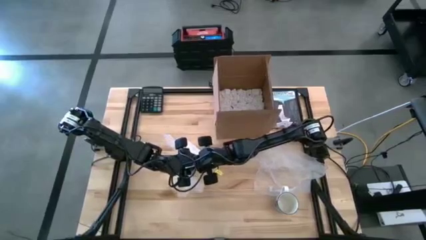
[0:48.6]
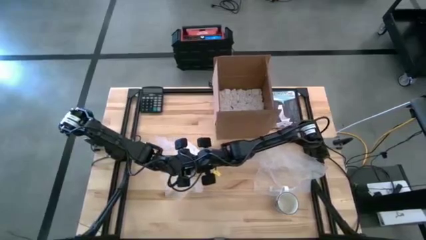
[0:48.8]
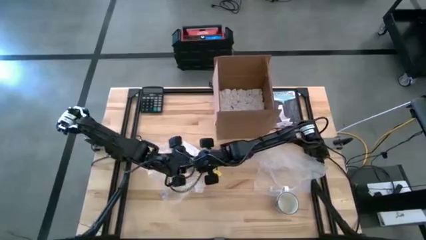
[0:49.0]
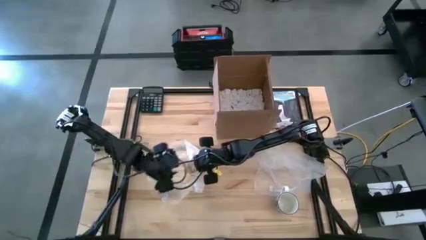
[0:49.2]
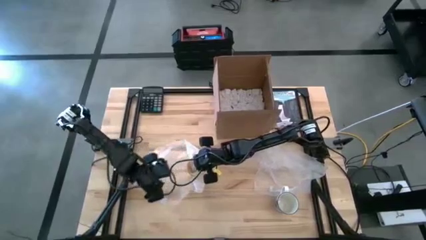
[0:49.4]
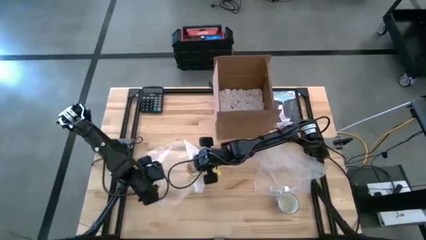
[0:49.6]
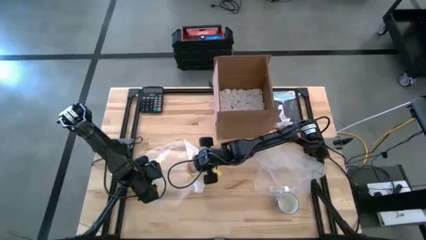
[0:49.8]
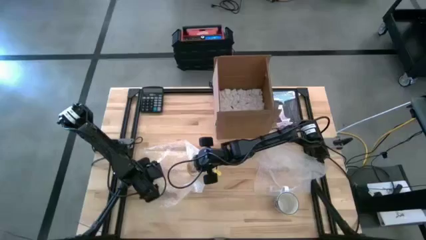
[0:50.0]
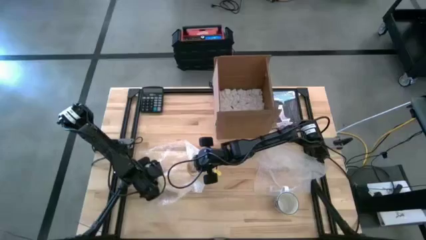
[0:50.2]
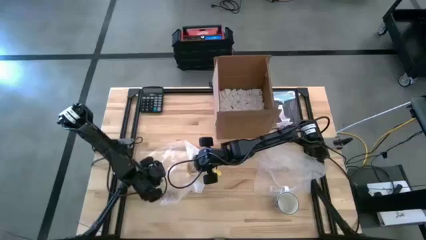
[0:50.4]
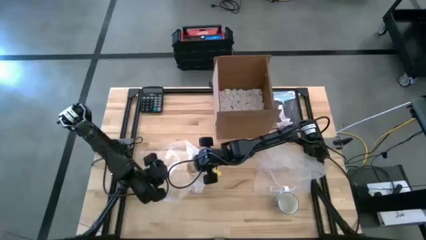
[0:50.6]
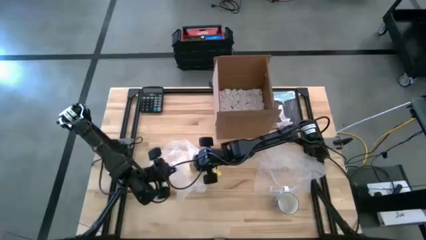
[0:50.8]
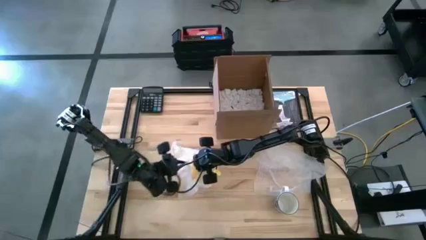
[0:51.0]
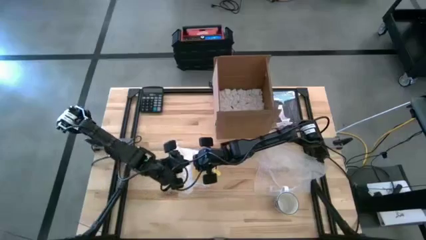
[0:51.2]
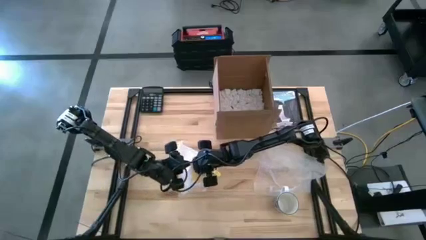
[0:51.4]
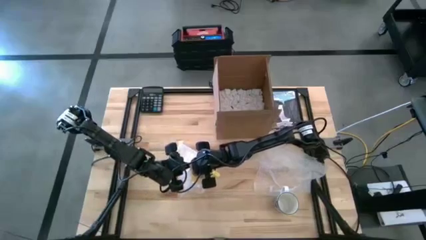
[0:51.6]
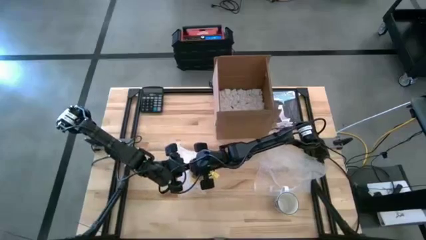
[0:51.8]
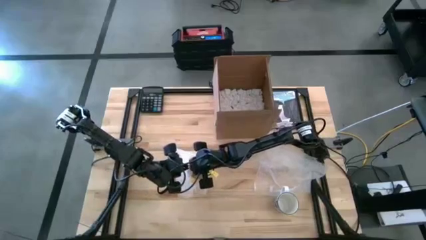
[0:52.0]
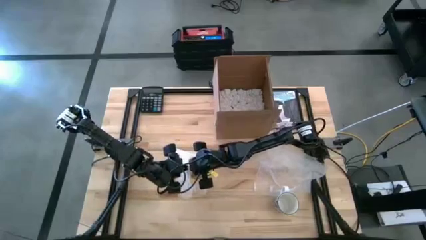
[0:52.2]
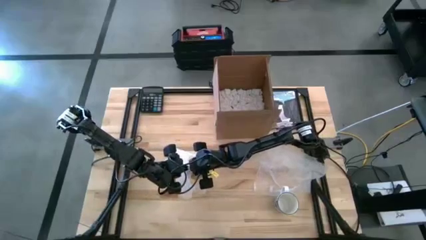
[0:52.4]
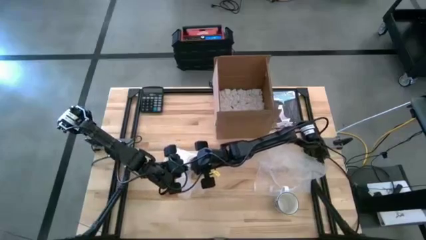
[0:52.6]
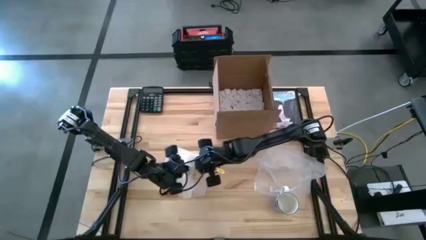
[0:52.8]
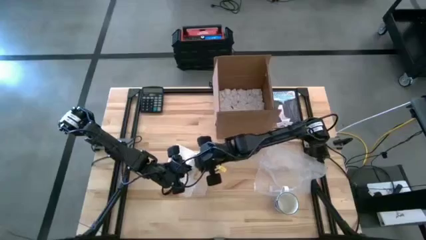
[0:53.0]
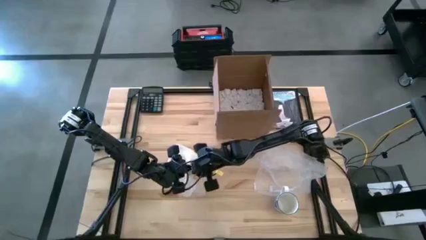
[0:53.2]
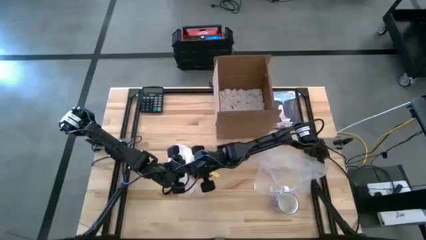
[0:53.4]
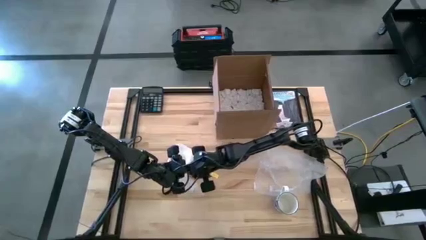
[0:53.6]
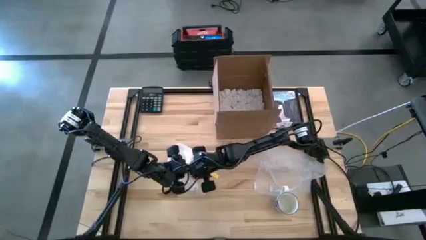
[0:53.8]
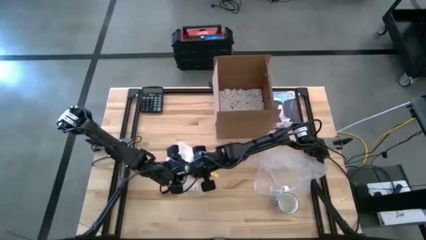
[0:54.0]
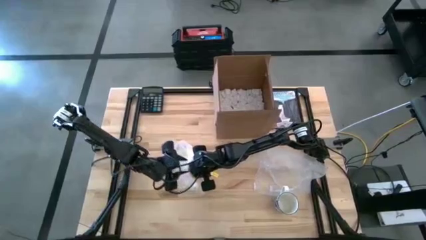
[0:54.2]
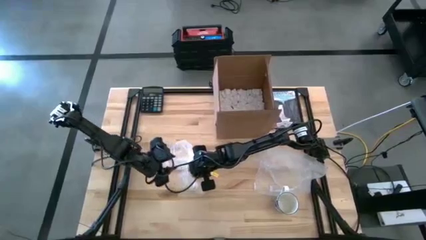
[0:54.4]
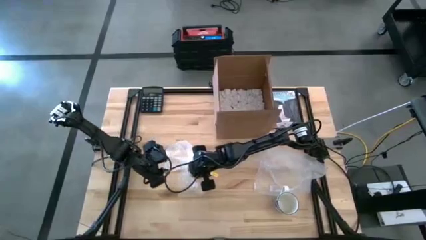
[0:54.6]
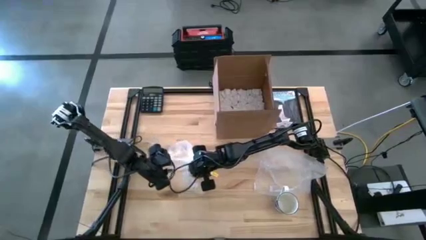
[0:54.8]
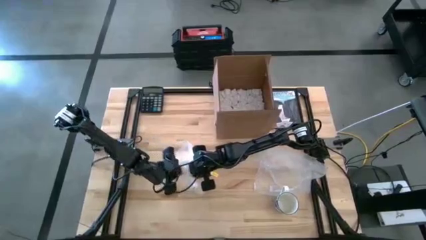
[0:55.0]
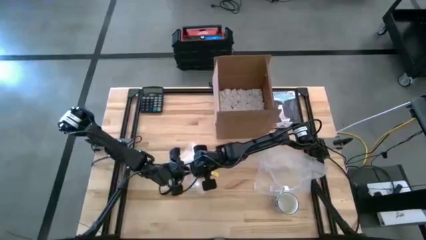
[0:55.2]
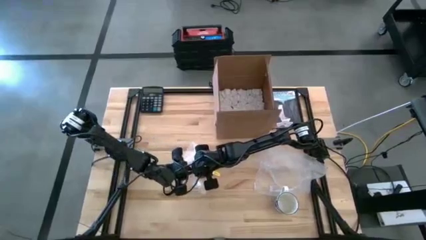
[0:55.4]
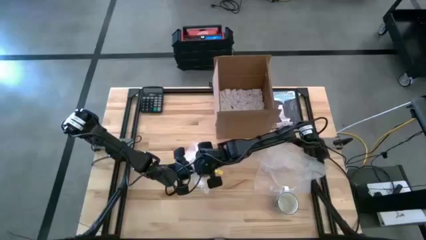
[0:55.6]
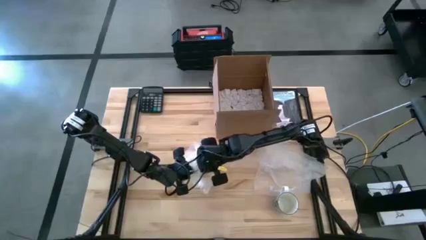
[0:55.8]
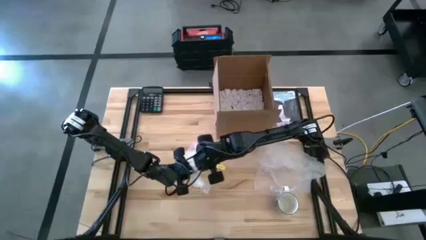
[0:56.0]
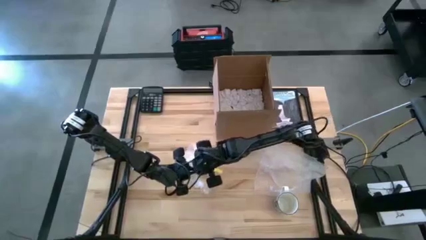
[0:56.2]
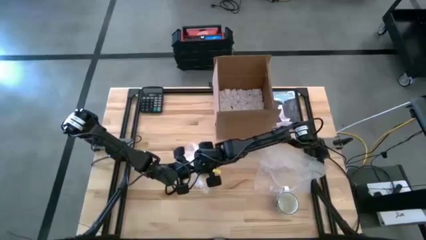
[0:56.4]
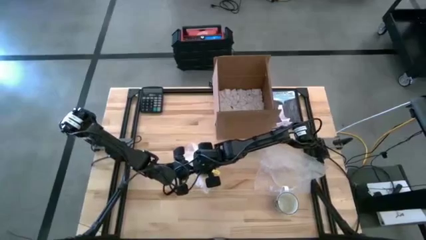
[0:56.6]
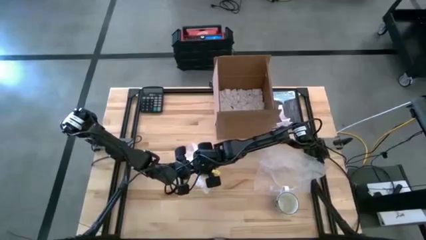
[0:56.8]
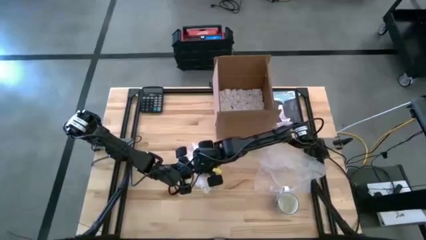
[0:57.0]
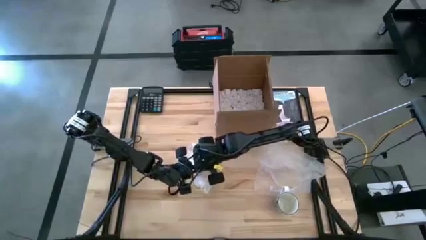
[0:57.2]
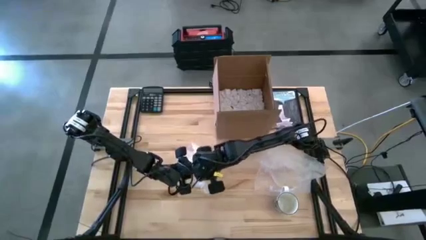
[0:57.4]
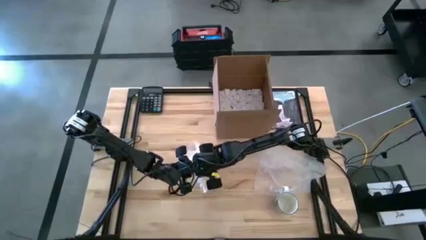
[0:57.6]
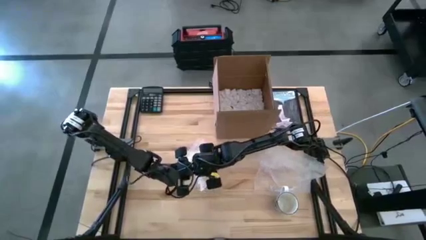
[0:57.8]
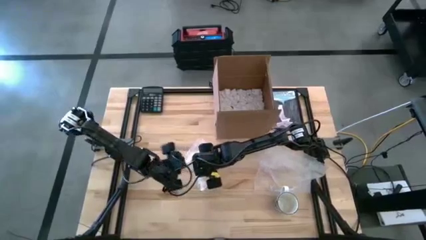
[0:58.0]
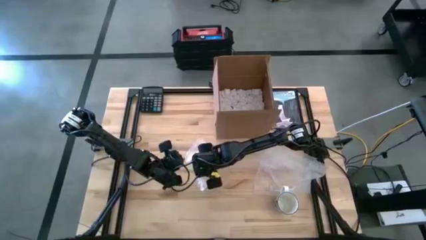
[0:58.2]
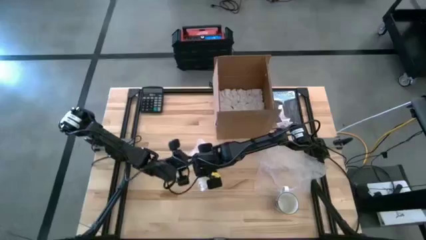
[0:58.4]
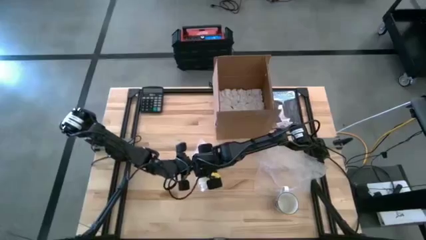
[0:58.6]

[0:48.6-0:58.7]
Task: wrap mug
Wrap the yellow mug with the left transparent bubble wrap
